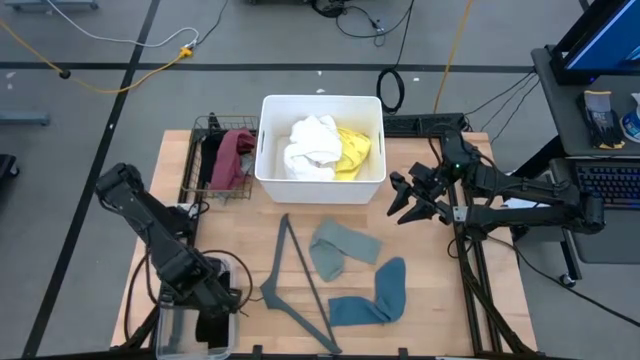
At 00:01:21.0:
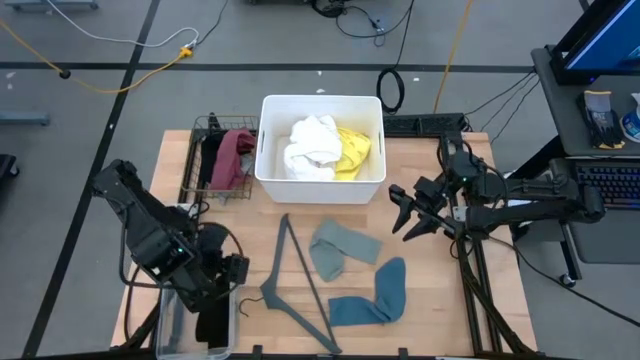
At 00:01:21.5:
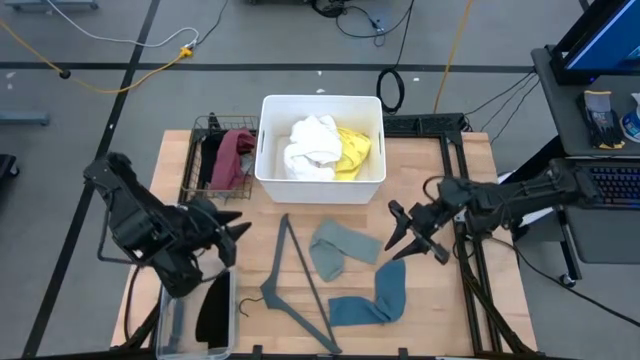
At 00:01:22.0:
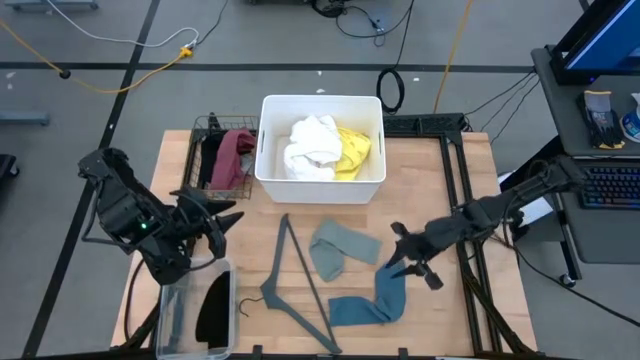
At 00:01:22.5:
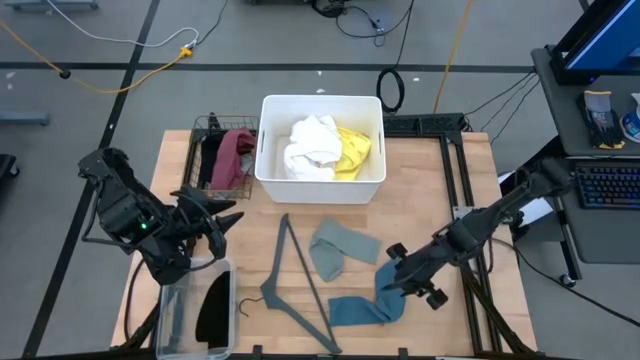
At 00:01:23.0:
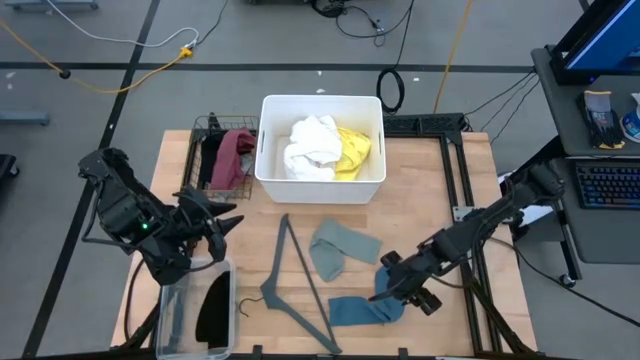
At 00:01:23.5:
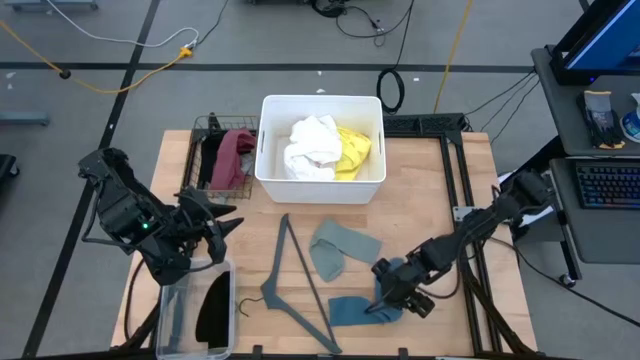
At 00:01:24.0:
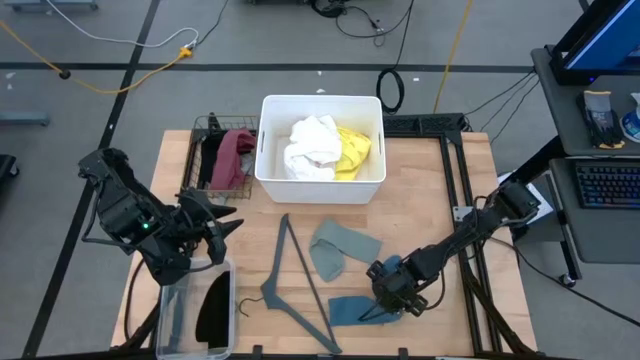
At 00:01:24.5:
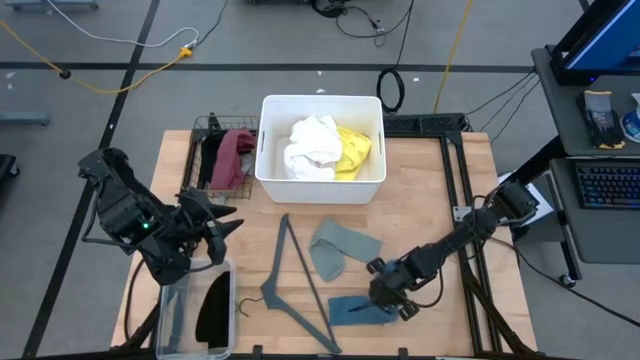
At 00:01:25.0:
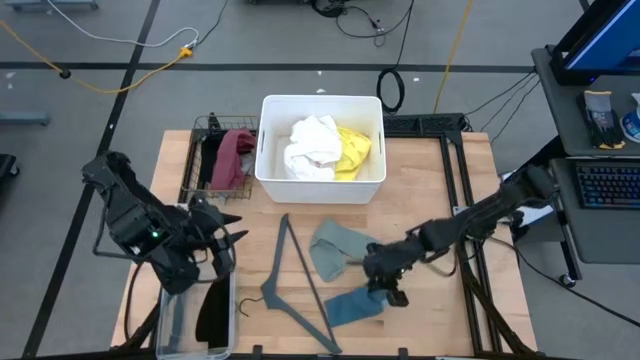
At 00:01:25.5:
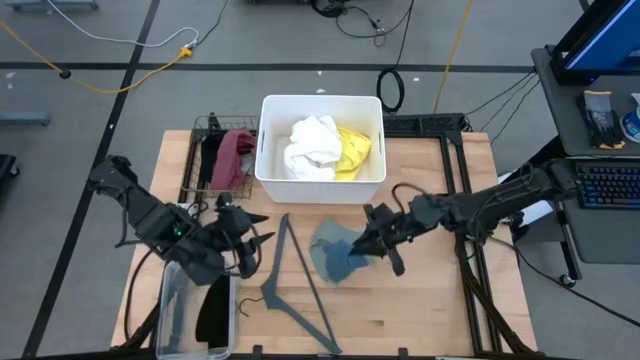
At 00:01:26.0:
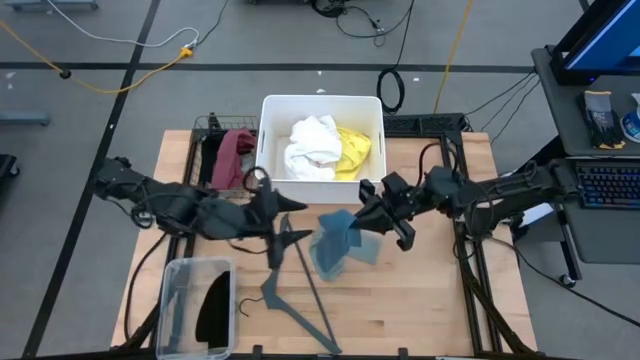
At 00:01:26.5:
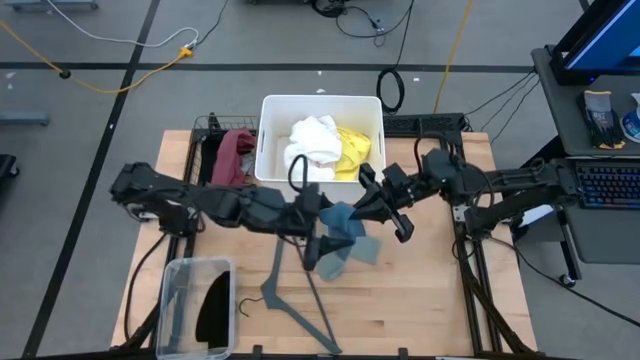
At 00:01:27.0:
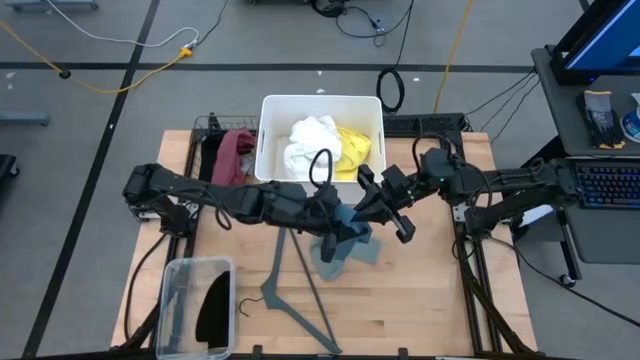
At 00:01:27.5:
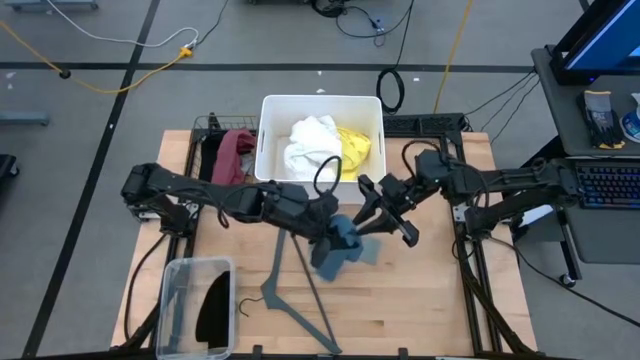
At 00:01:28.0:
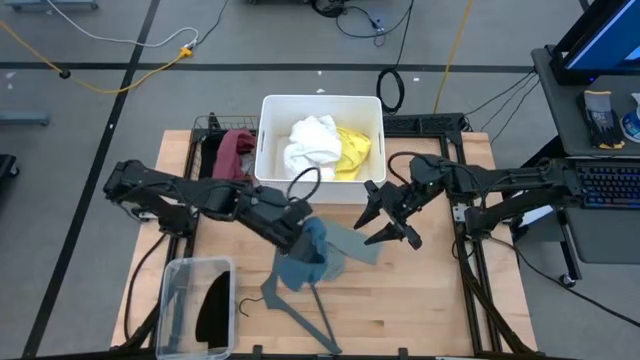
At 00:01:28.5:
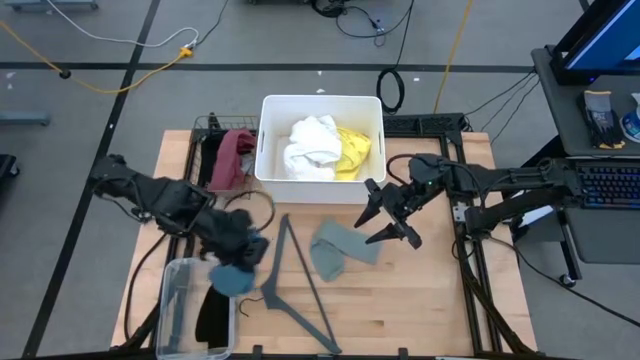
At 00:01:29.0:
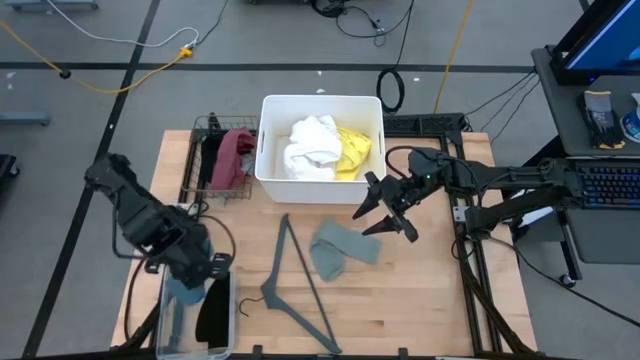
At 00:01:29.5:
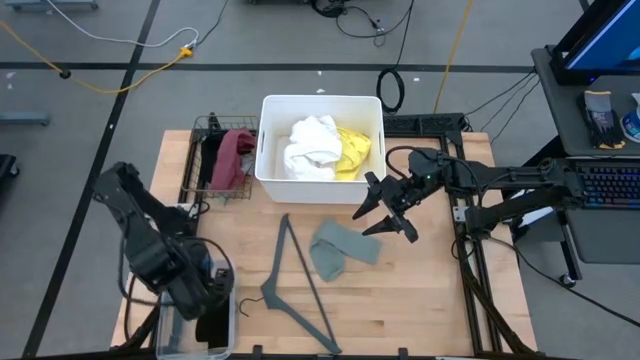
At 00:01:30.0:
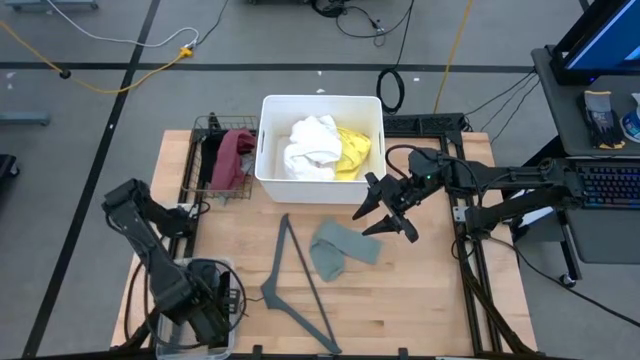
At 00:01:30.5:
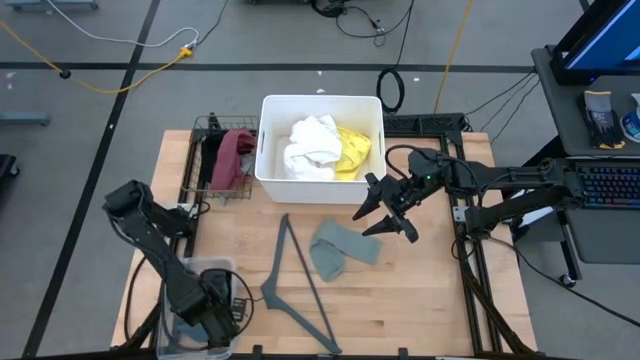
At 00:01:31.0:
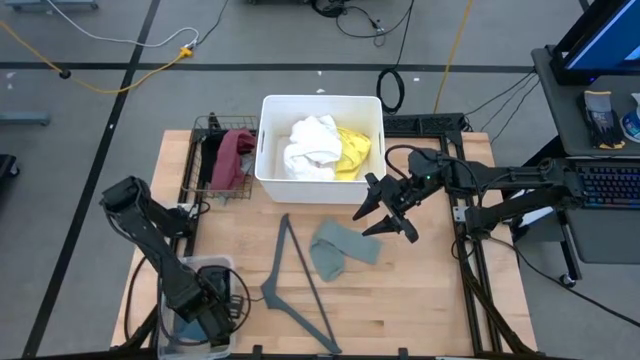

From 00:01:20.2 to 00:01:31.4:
Task: Pick & Place Cloths
Put the blue sock into the transparent bin

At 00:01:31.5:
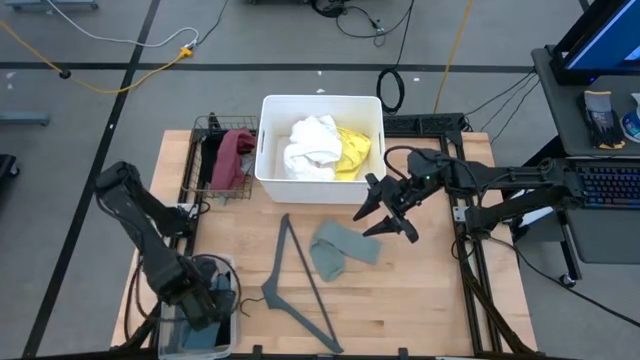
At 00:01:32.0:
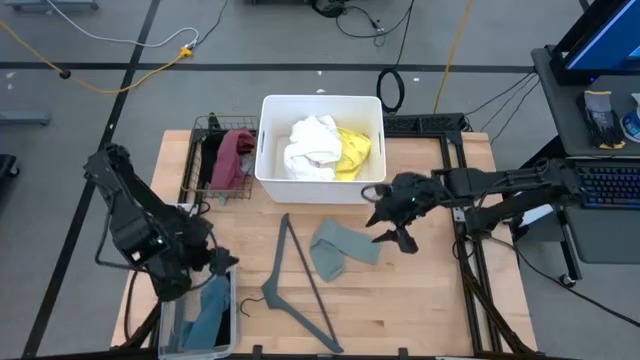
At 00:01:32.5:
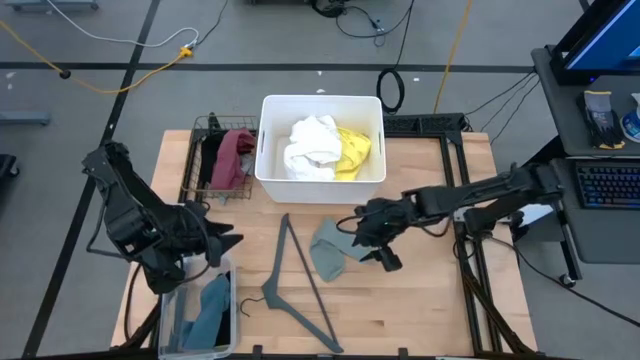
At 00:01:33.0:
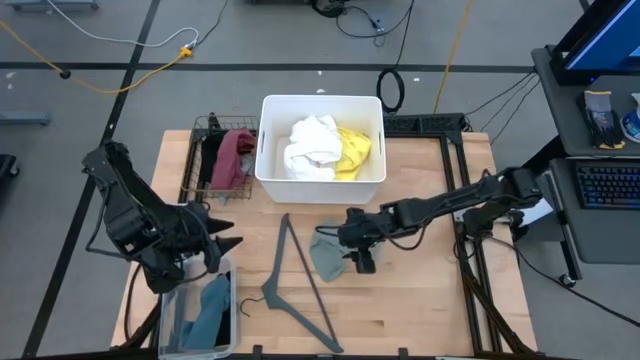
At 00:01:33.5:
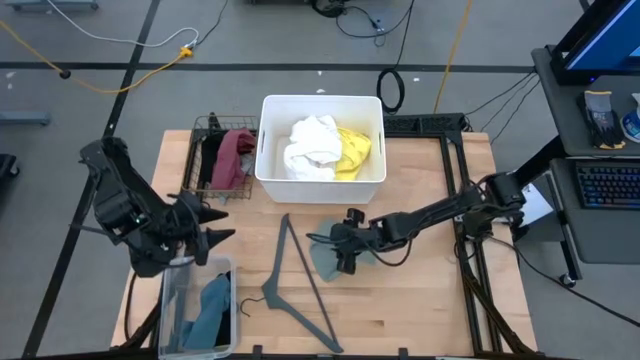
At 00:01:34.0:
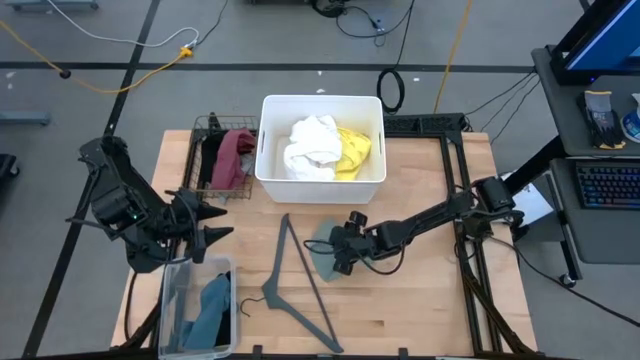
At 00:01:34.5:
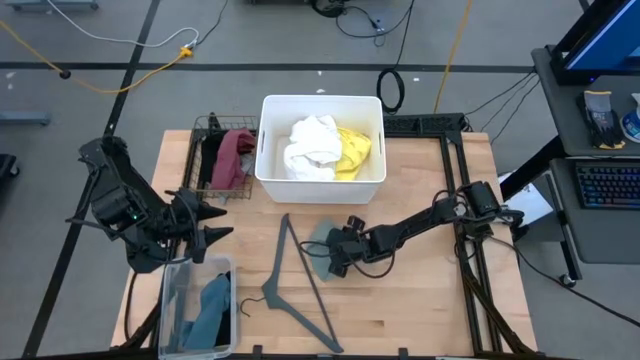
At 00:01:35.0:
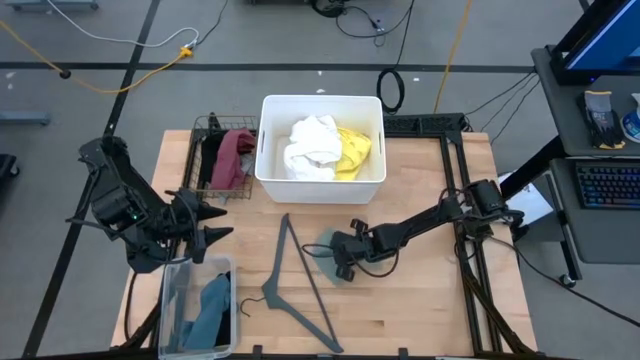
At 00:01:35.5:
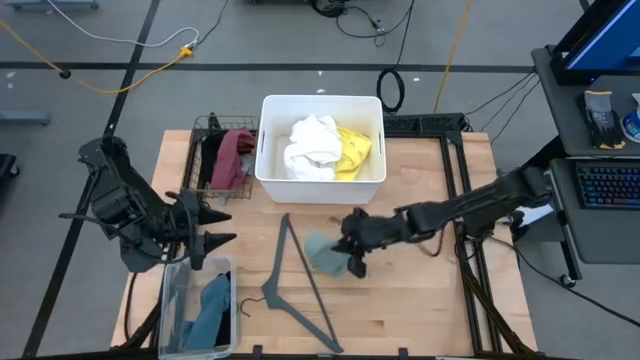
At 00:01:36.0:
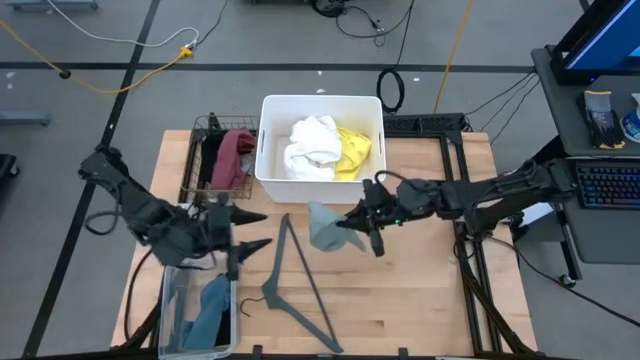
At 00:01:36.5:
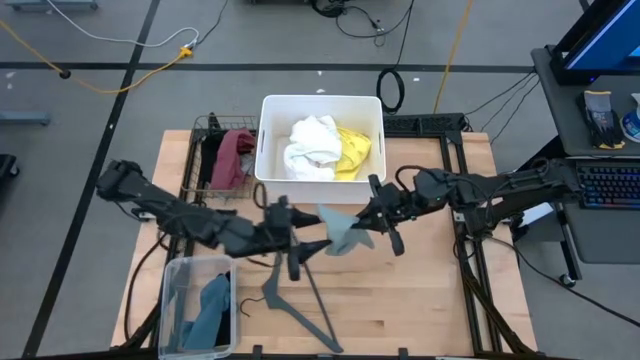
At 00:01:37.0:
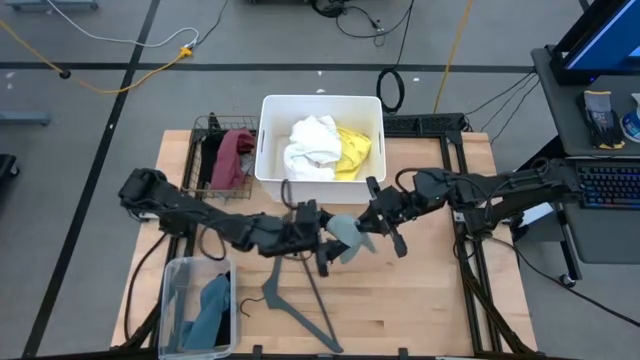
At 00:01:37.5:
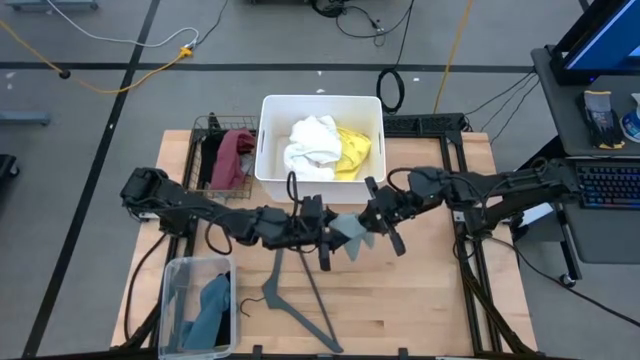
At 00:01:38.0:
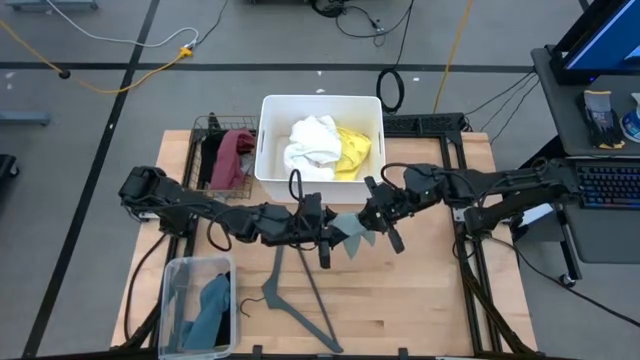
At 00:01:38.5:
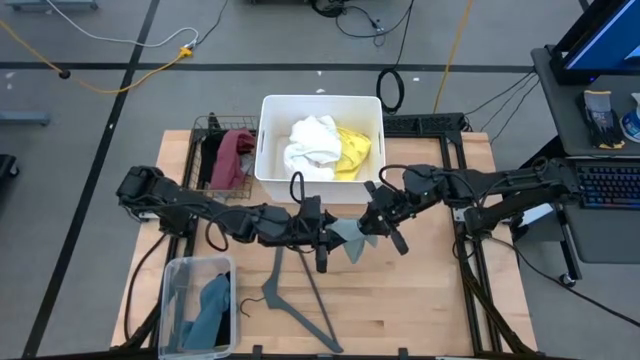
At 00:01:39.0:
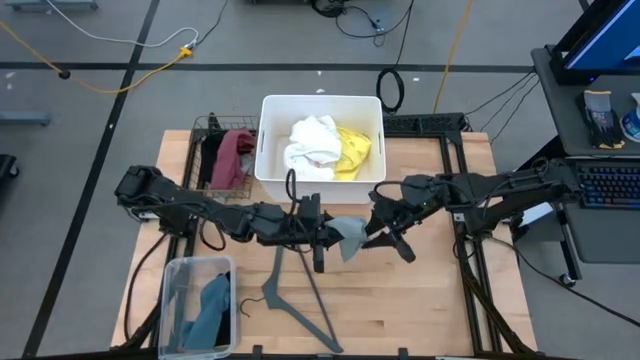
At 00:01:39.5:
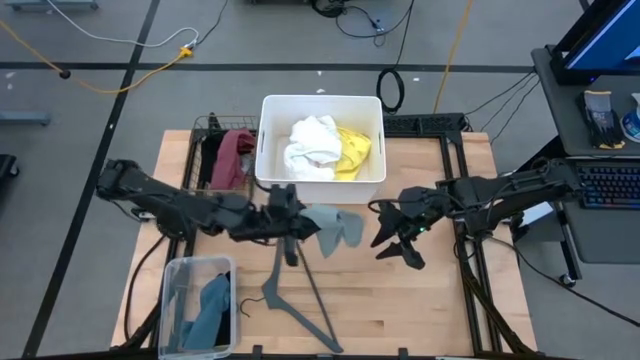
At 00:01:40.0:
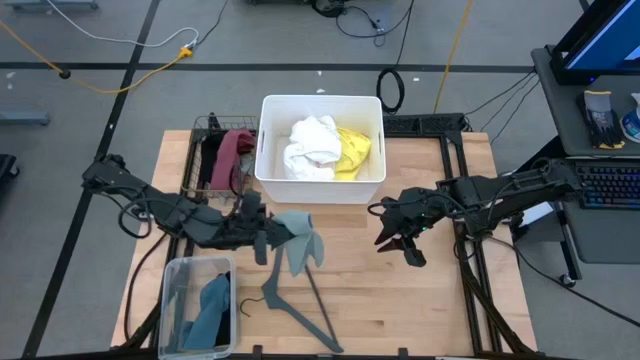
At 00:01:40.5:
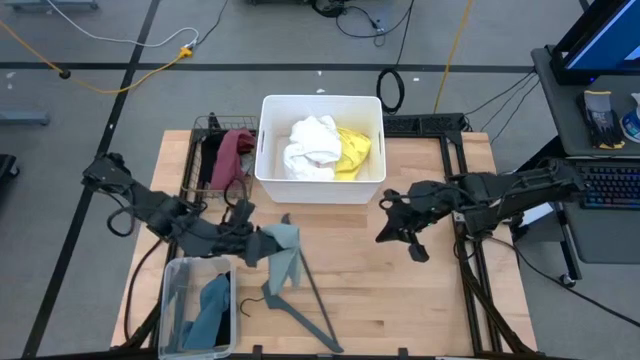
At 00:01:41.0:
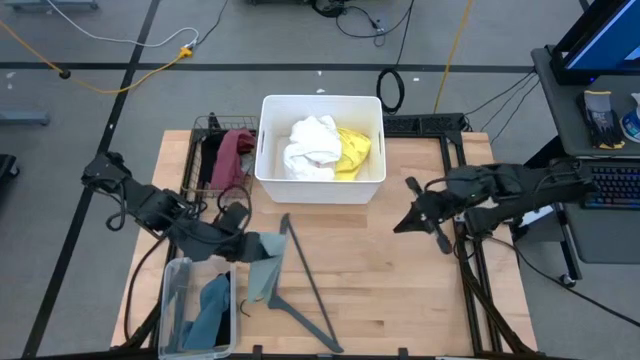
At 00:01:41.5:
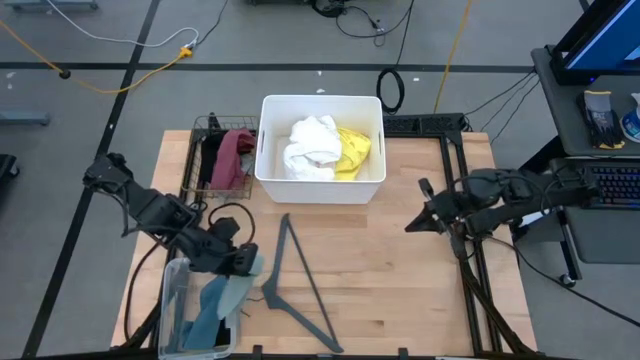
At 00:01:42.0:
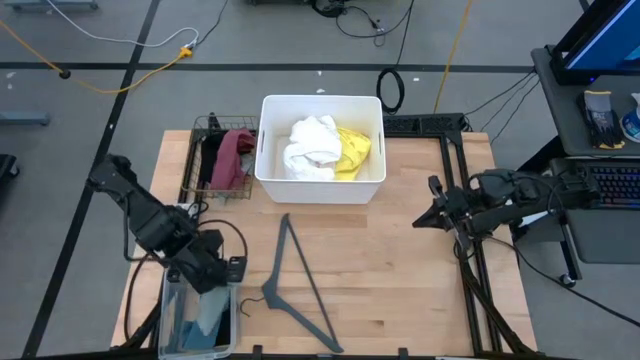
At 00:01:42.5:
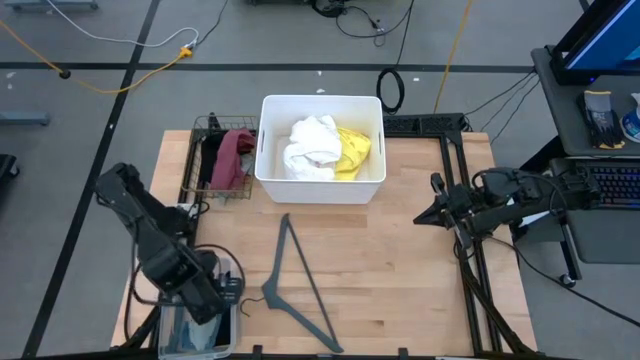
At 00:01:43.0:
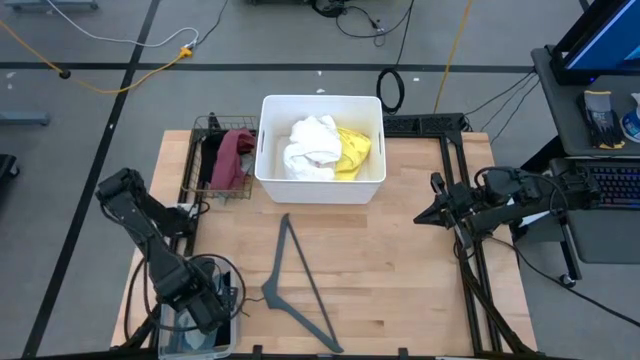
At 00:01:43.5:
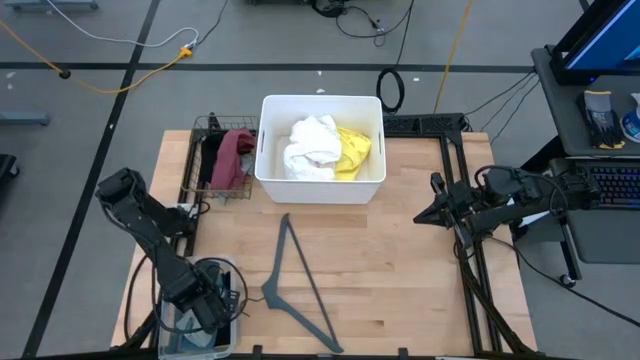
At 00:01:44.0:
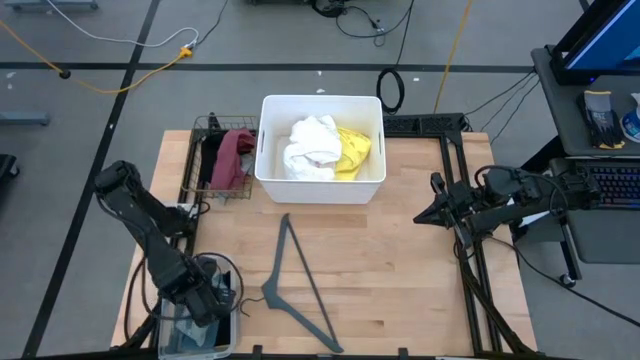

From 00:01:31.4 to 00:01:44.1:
Put the gray sock into the transparent bin
